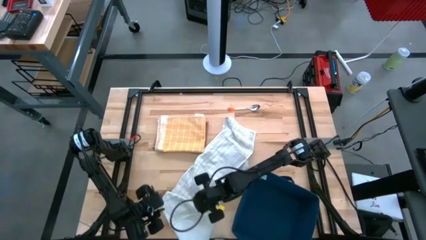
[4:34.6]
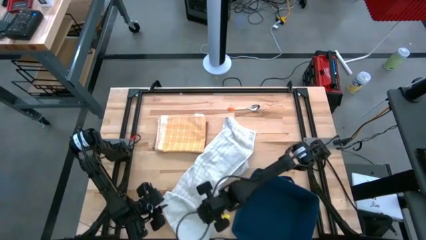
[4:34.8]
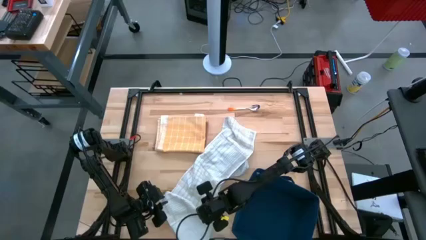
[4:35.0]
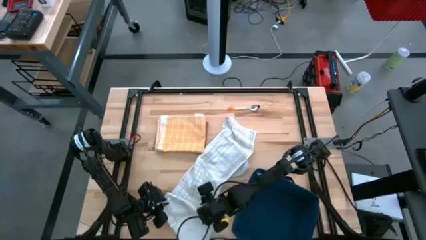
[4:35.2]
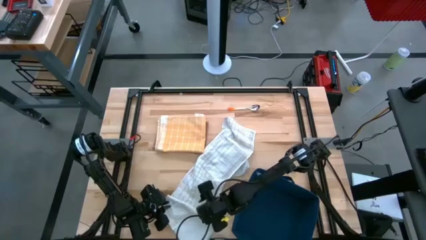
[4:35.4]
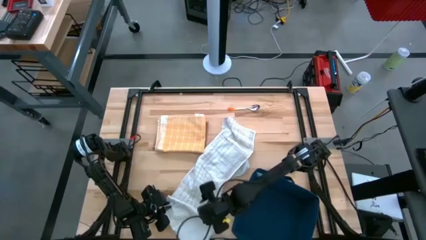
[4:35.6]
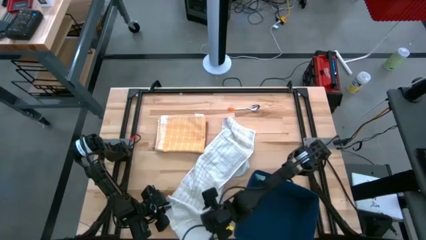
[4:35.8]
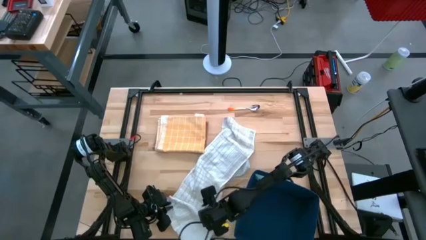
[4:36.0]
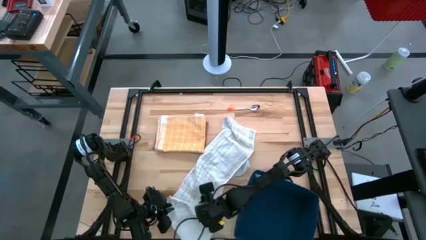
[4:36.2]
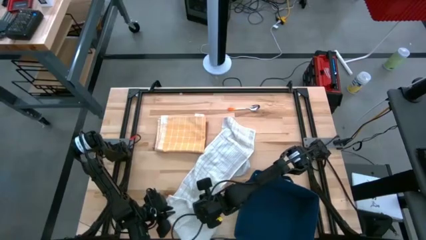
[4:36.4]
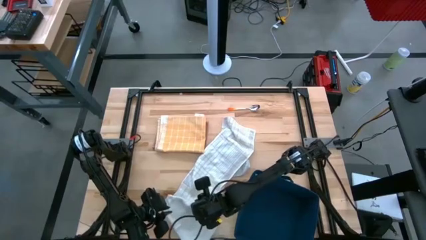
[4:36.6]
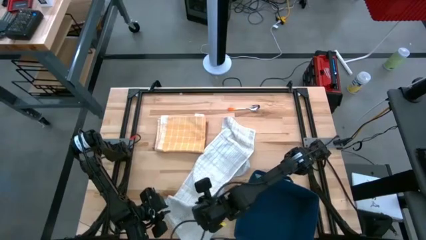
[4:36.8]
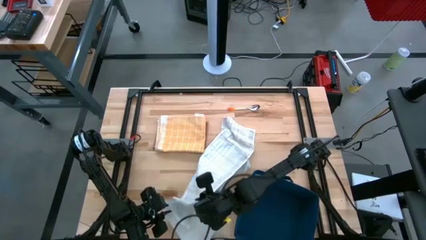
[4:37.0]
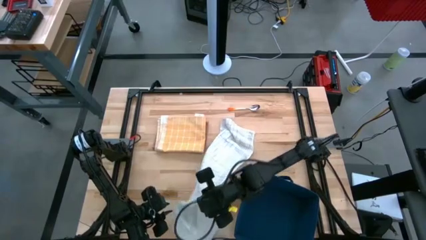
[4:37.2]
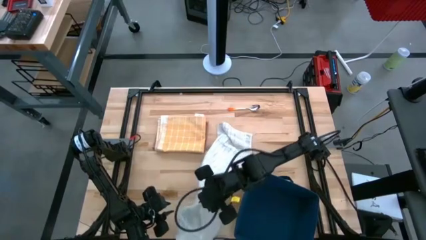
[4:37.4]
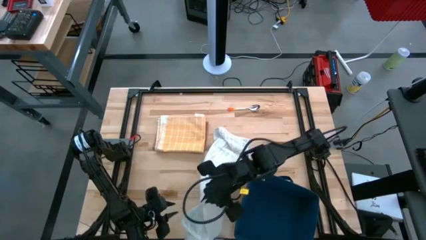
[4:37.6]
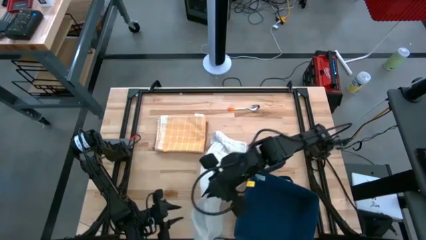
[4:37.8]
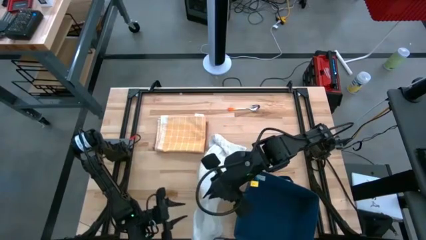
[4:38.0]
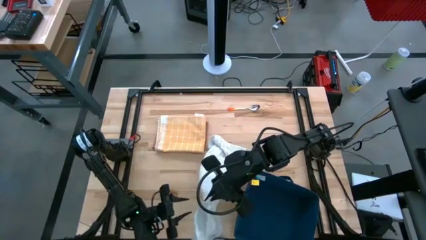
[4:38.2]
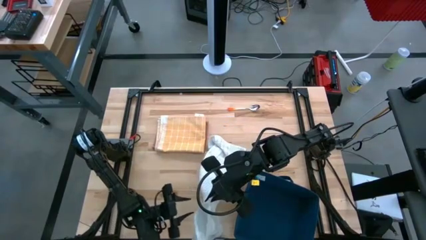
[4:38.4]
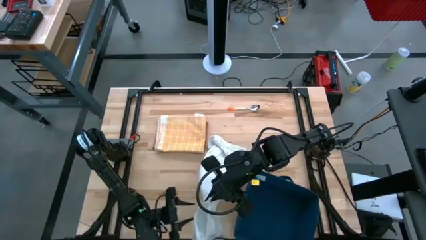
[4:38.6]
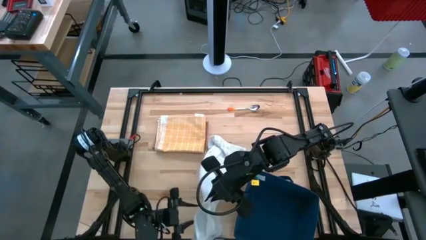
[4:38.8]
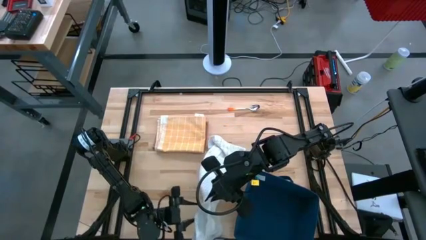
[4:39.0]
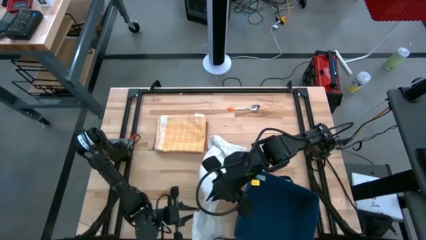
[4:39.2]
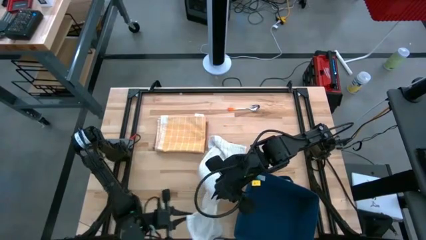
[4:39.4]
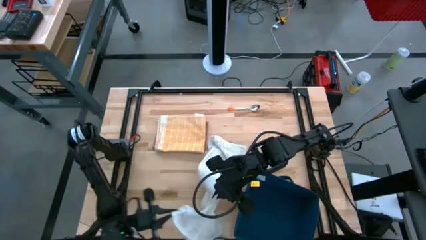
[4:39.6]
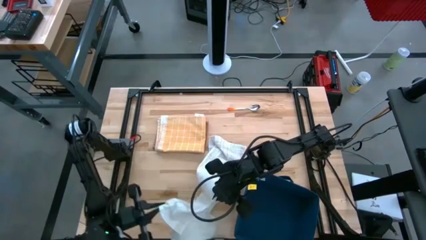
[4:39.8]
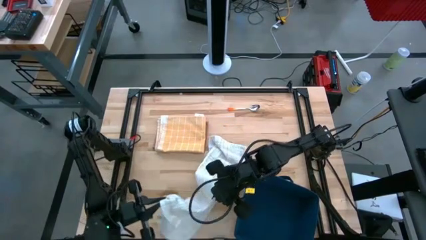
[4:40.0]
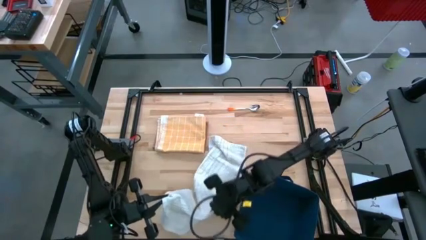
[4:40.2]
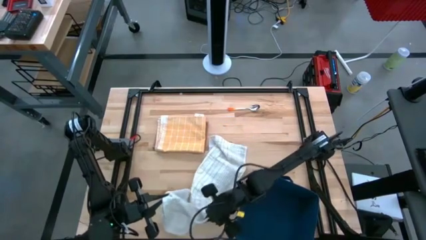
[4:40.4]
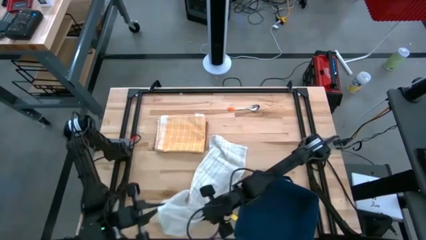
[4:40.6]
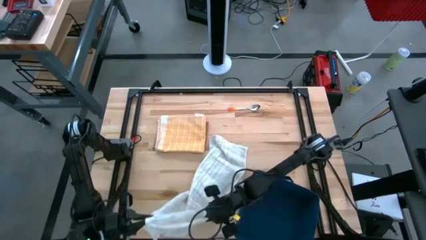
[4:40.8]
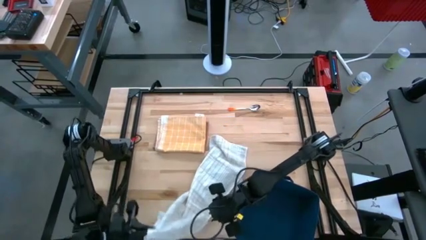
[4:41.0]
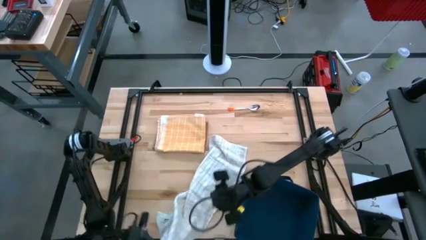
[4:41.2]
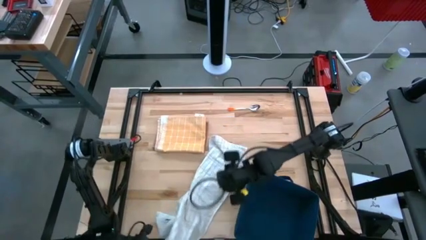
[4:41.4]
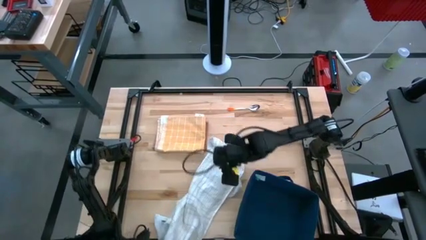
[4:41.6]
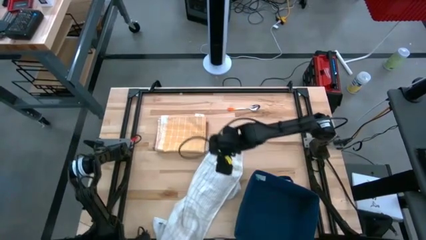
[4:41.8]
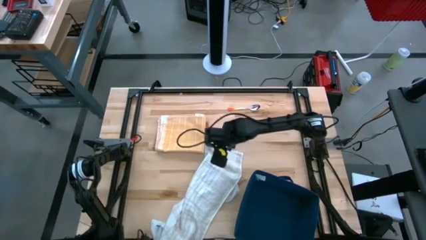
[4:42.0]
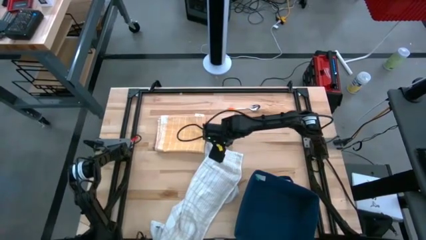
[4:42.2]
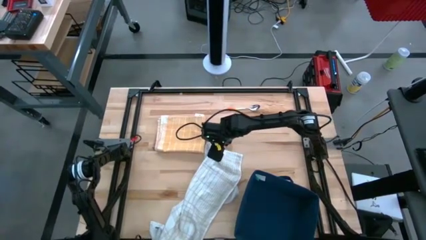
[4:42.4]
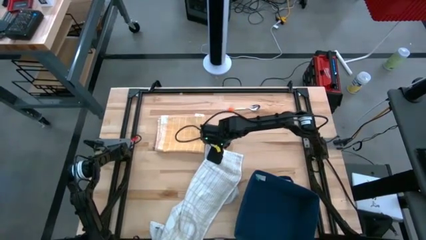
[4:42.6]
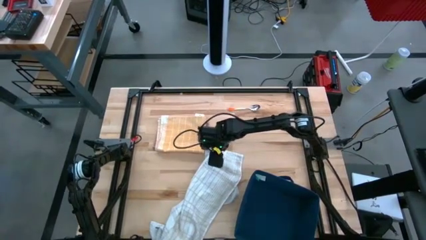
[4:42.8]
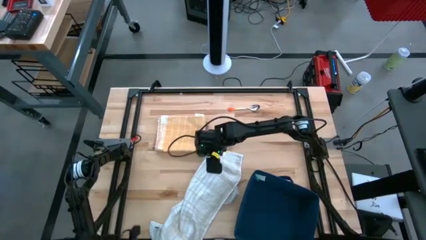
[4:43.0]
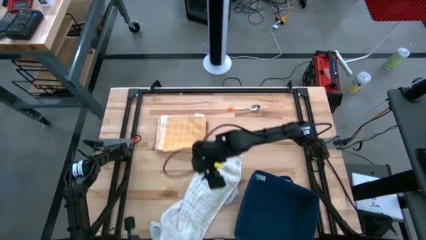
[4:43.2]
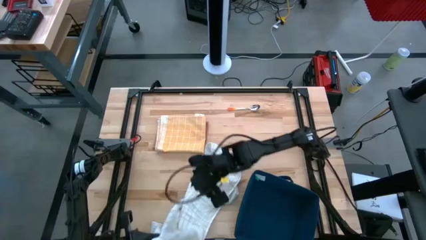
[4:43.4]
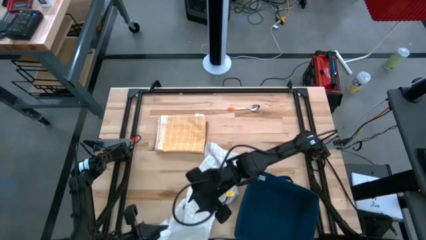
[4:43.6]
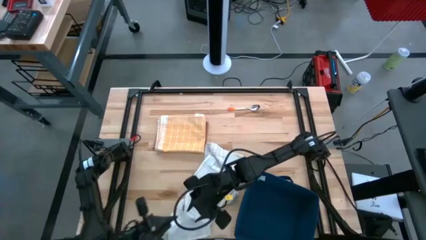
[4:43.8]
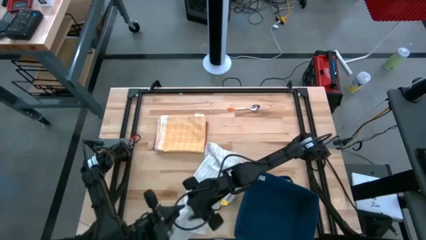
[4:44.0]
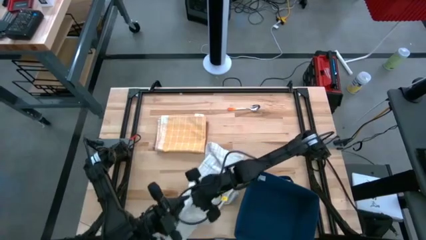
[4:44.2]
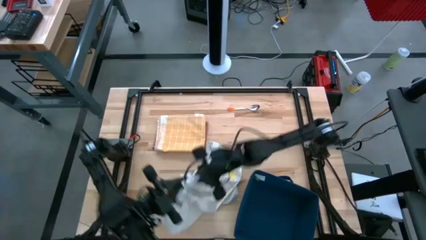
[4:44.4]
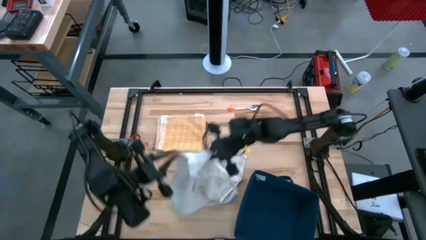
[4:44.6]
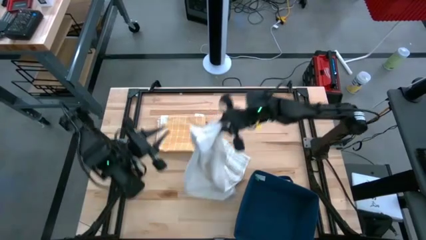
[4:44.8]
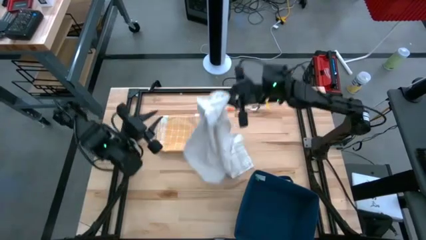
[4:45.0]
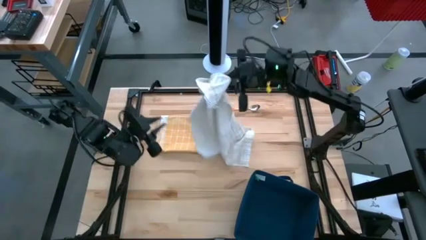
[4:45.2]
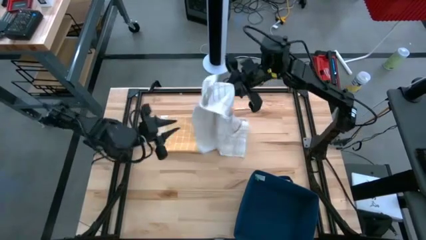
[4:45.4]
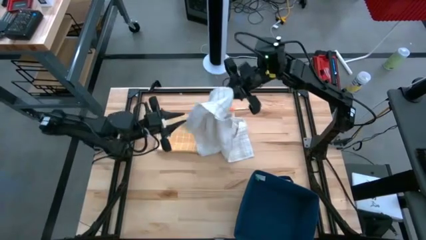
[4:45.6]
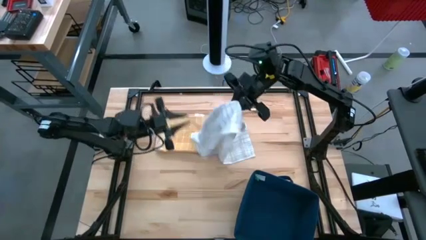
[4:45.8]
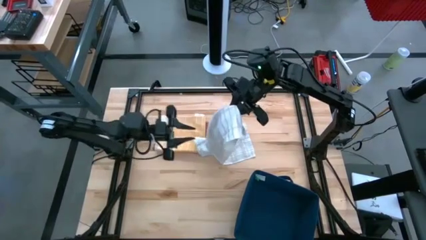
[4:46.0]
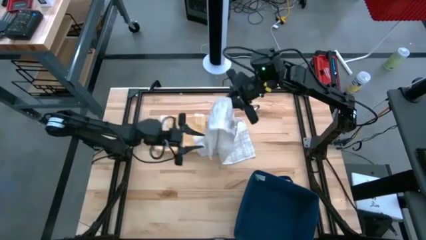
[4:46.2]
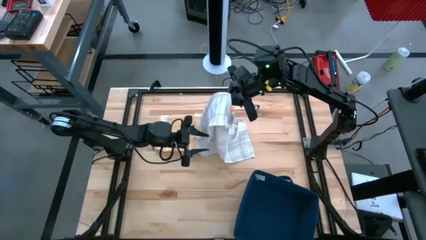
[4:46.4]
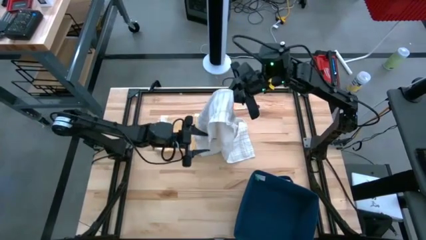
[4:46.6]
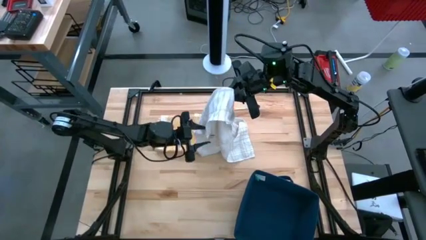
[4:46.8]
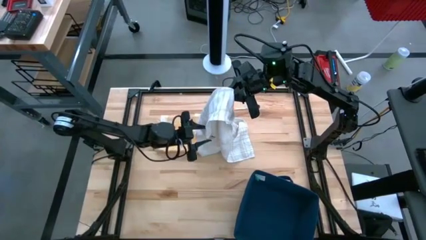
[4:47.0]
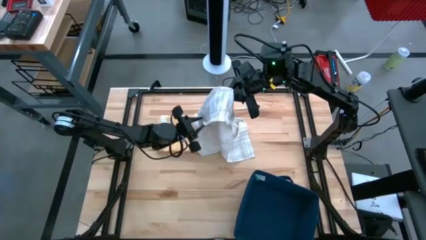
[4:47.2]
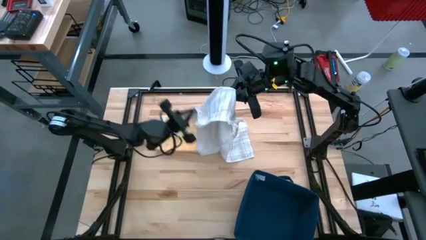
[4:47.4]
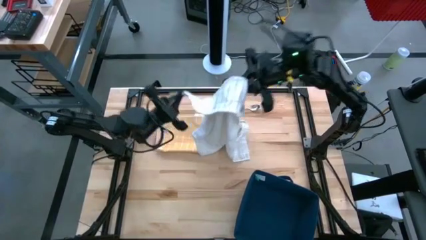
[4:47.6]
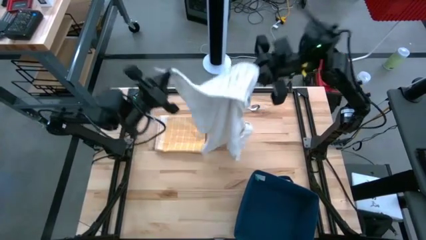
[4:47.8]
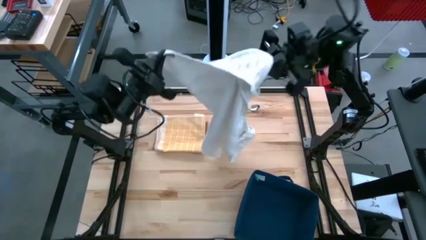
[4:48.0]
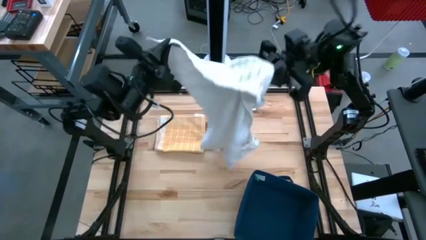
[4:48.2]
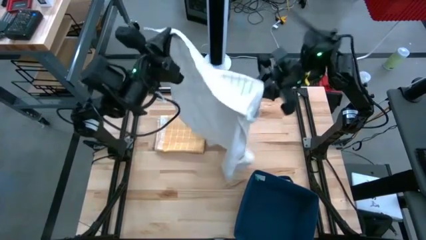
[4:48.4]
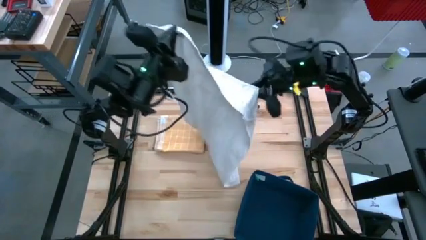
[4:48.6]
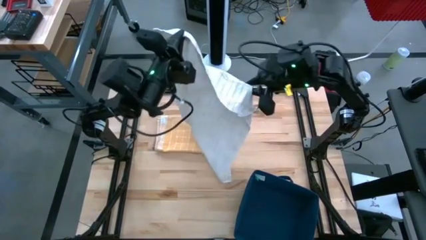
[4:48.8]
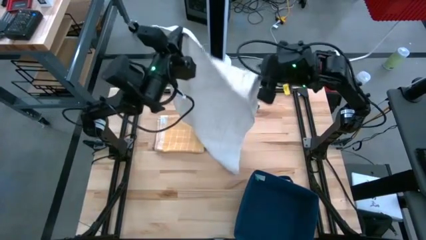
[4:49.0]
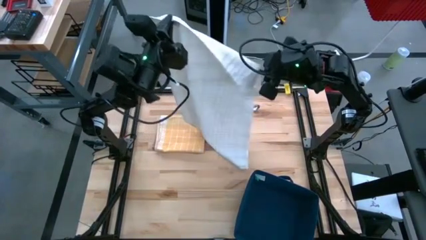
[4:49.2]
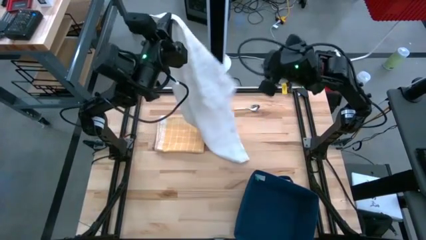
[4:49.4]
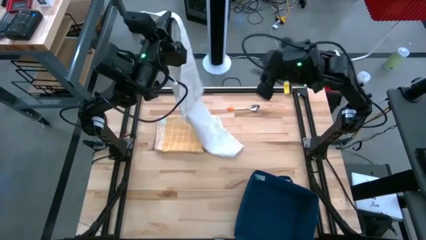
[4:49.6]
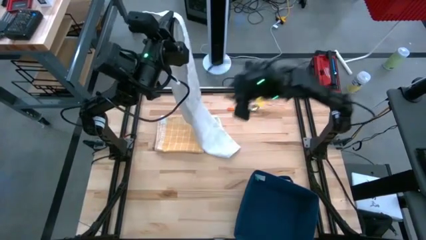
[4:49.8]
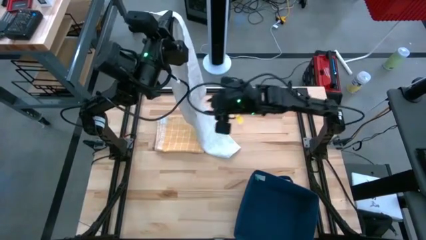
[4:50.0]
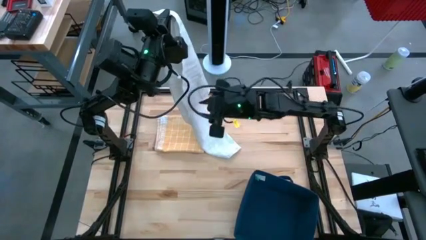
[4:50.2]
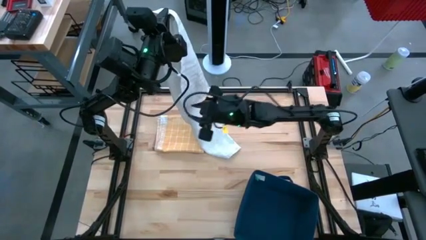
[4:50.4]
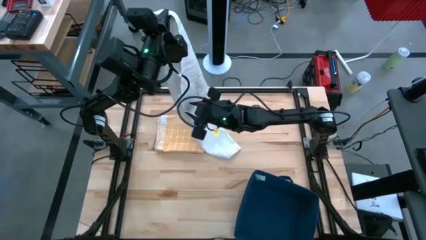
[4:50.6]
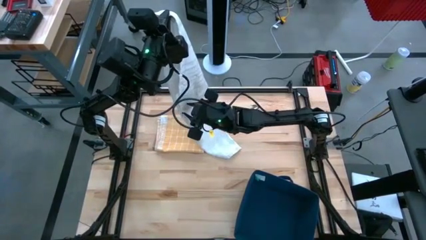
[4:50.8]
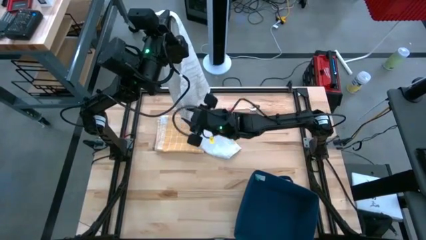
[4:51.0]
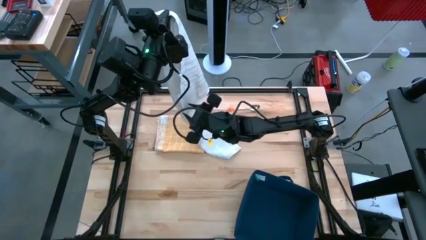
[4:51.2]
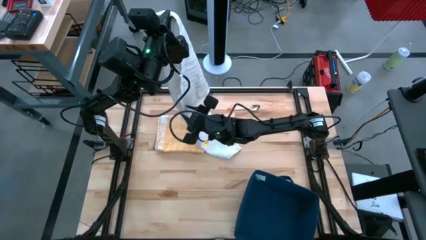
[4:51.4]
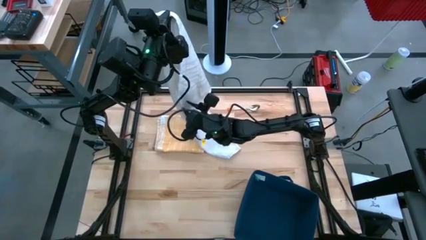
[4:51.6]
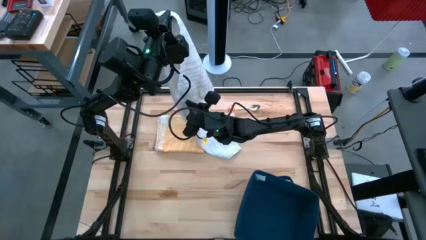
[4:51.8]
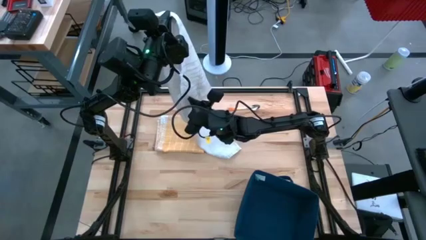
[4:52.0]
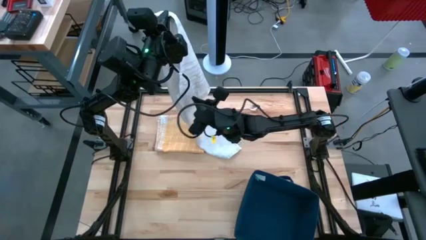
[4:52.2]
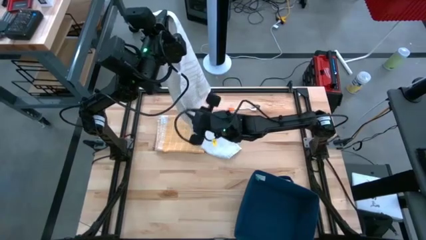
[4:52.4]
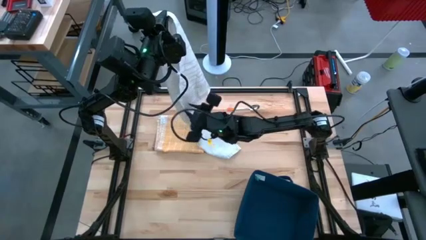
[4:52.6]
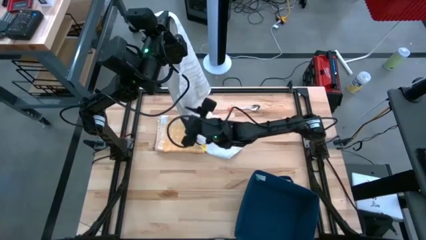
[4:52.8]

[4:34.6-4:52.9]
Task: Fold towel
Fold the white towel
